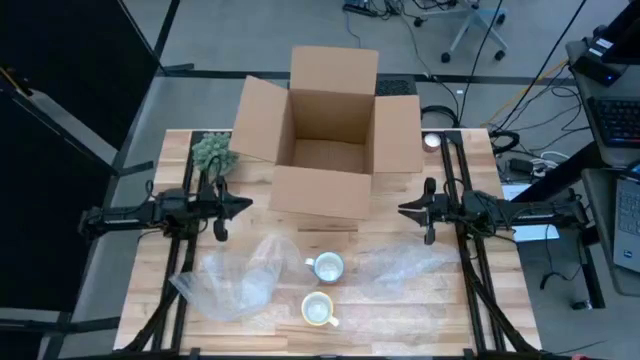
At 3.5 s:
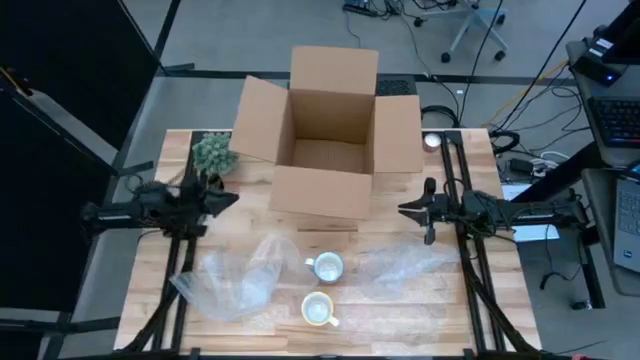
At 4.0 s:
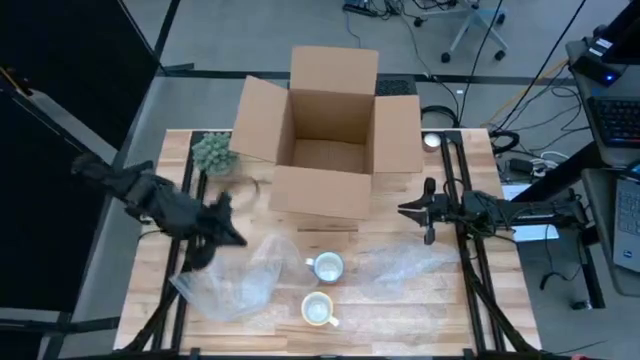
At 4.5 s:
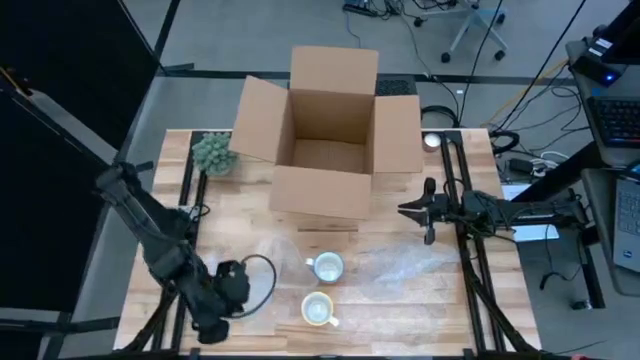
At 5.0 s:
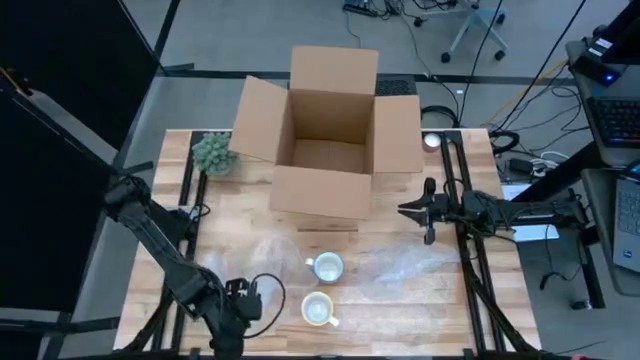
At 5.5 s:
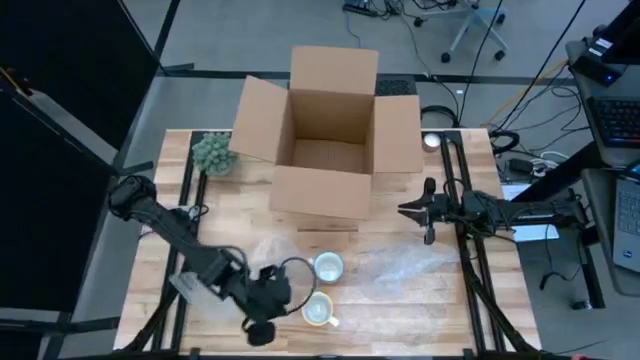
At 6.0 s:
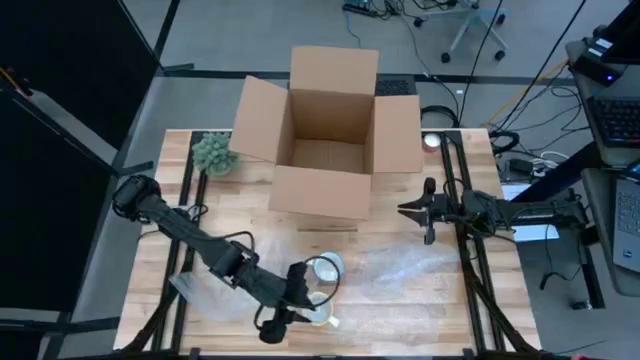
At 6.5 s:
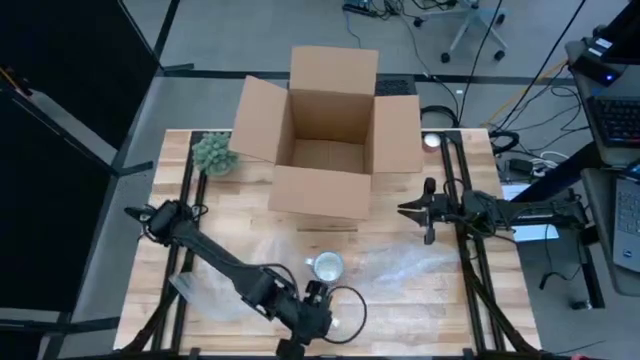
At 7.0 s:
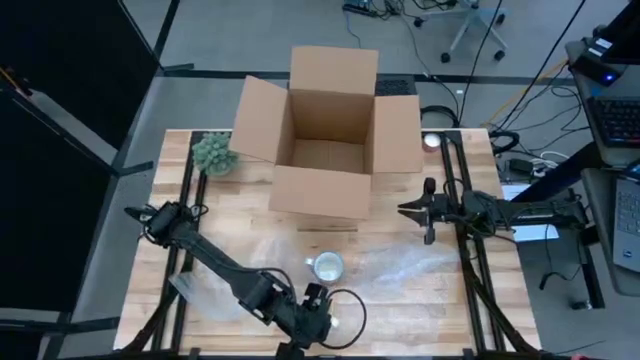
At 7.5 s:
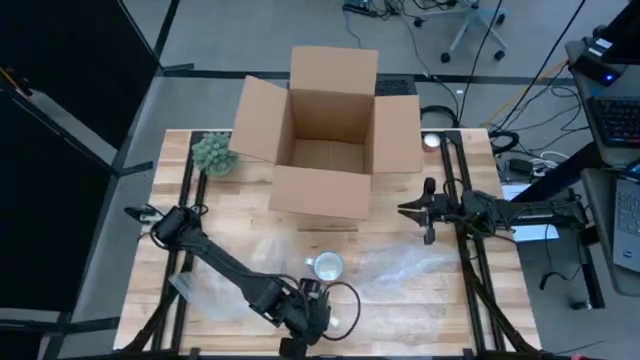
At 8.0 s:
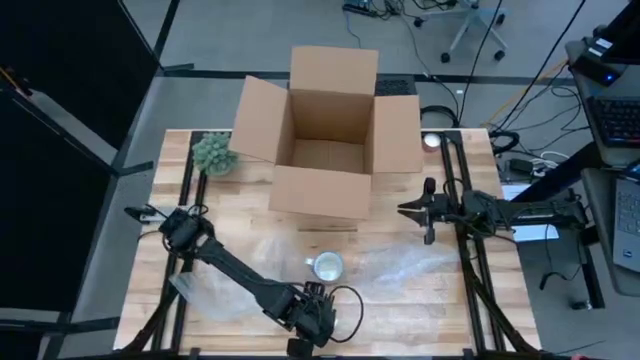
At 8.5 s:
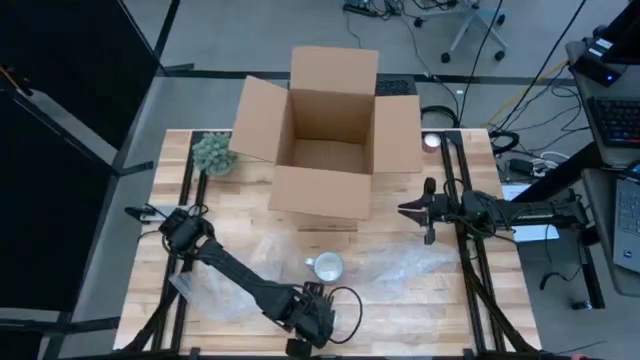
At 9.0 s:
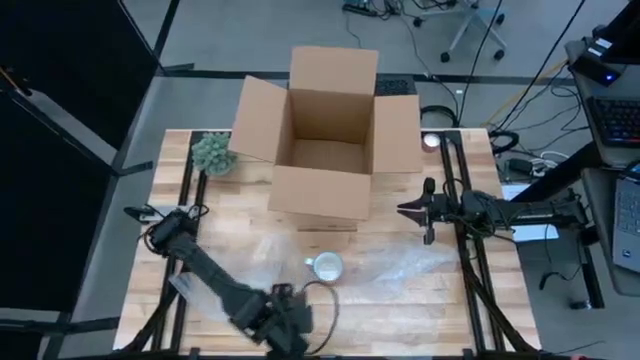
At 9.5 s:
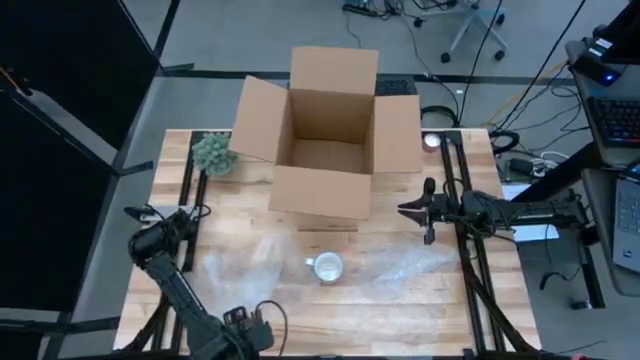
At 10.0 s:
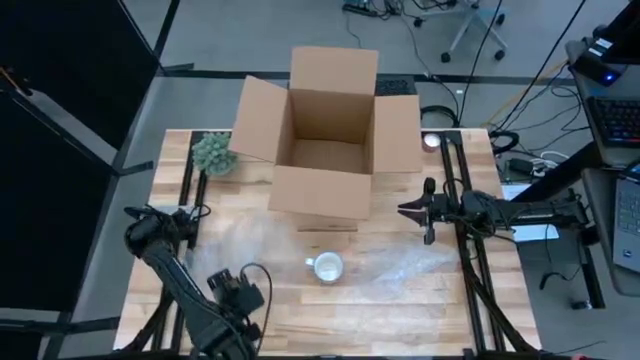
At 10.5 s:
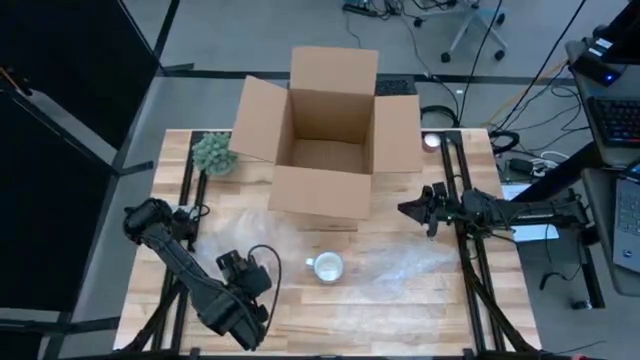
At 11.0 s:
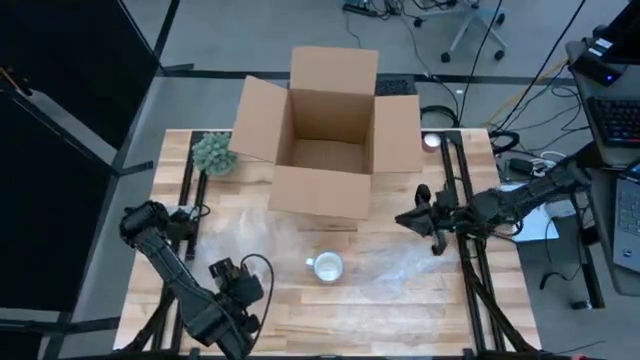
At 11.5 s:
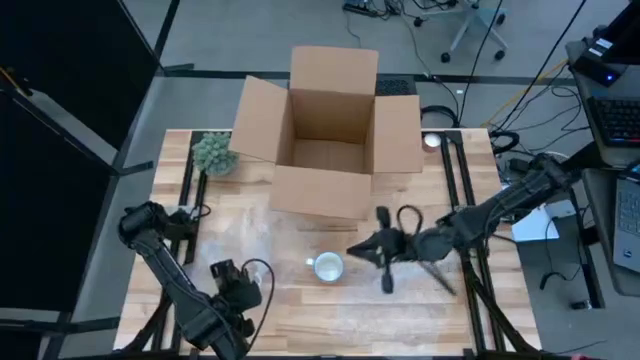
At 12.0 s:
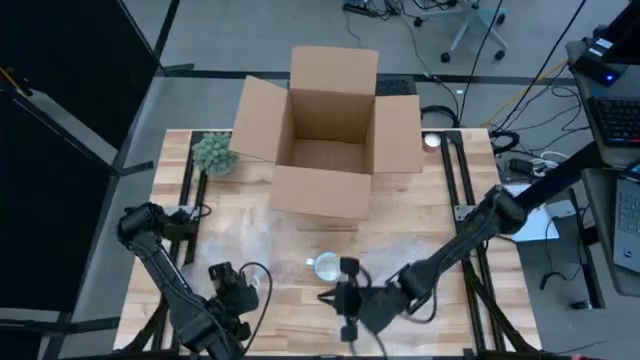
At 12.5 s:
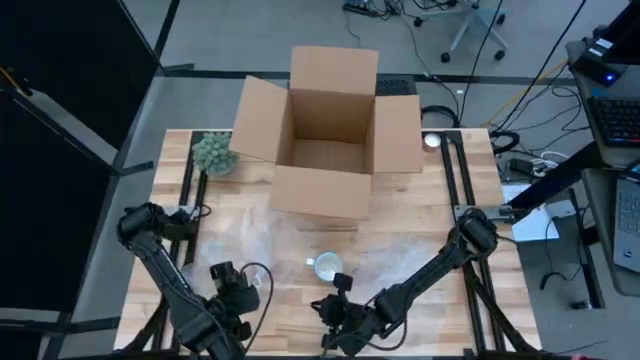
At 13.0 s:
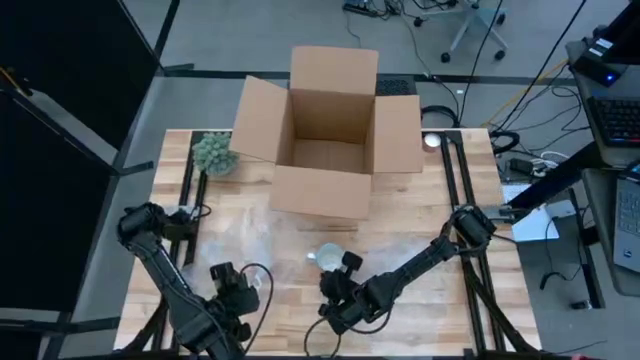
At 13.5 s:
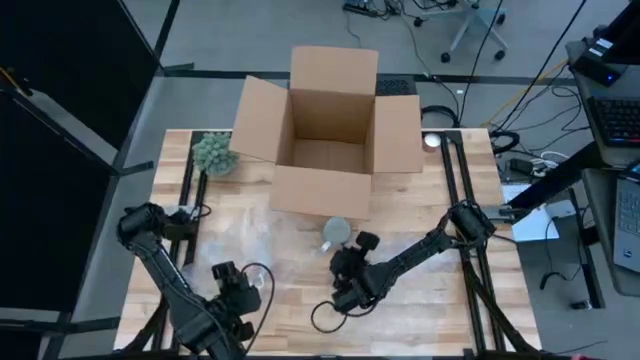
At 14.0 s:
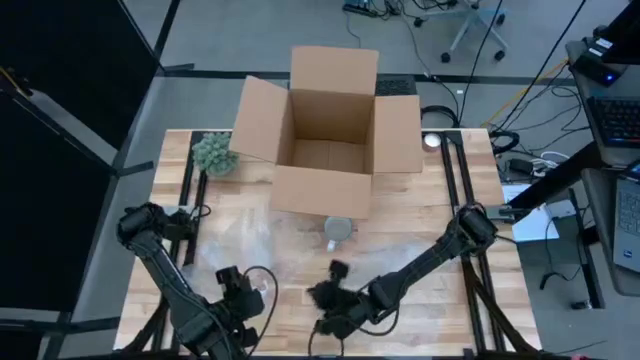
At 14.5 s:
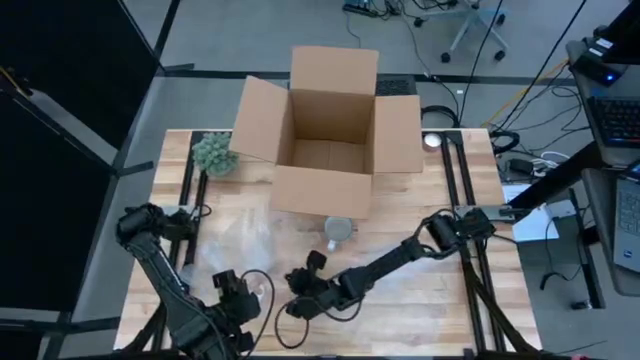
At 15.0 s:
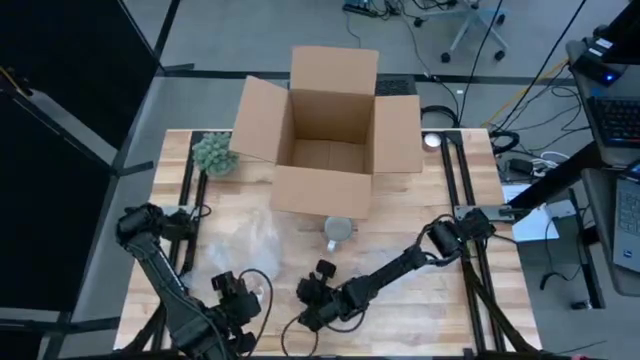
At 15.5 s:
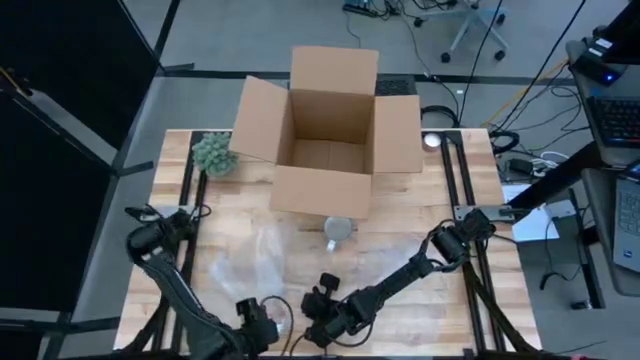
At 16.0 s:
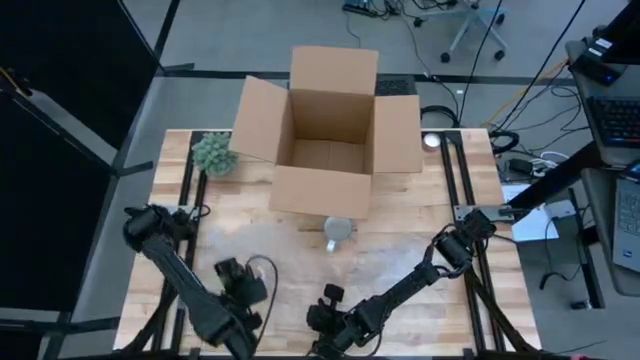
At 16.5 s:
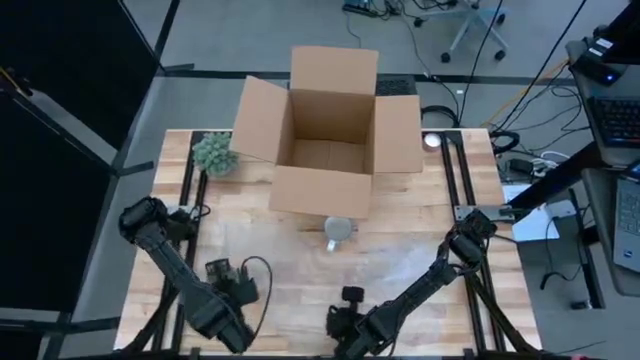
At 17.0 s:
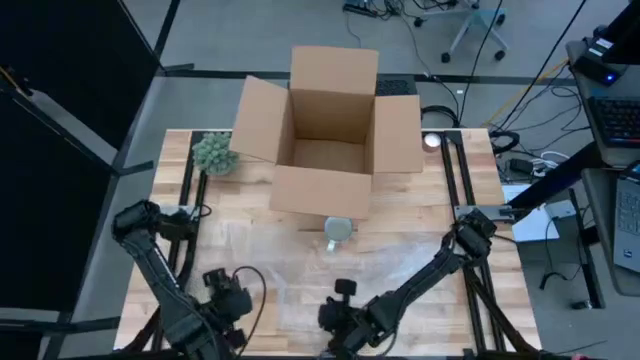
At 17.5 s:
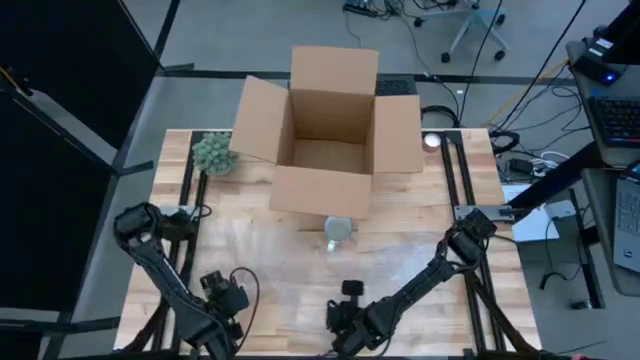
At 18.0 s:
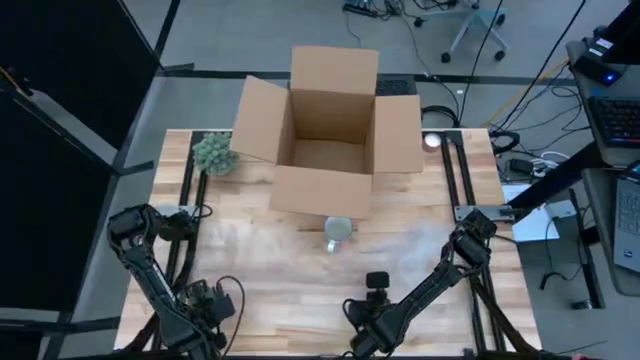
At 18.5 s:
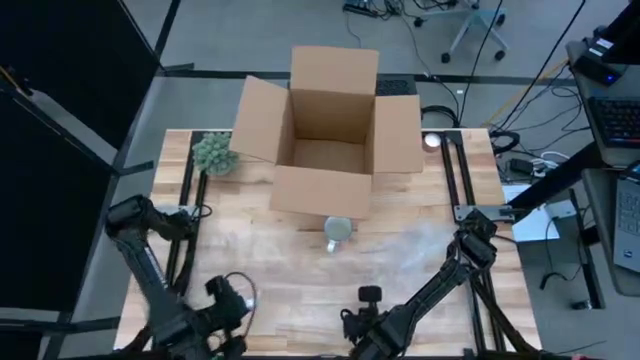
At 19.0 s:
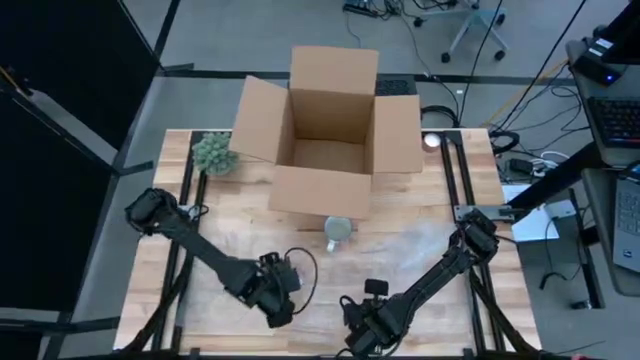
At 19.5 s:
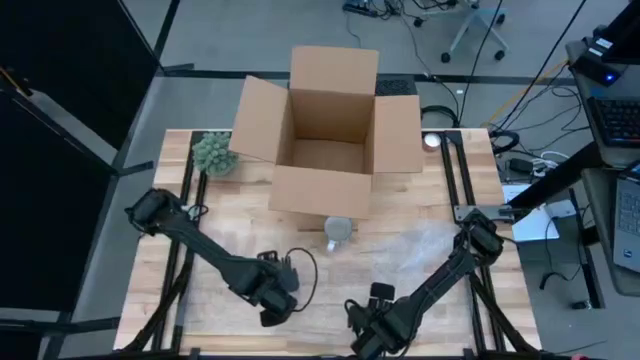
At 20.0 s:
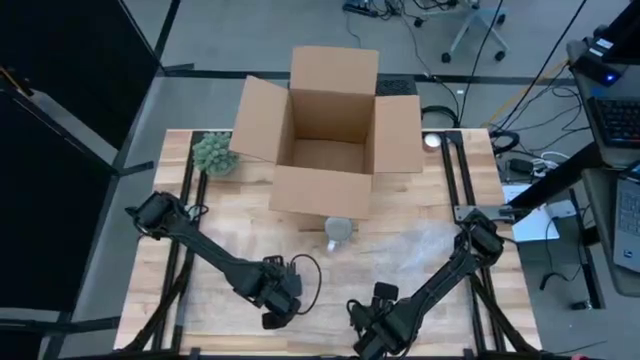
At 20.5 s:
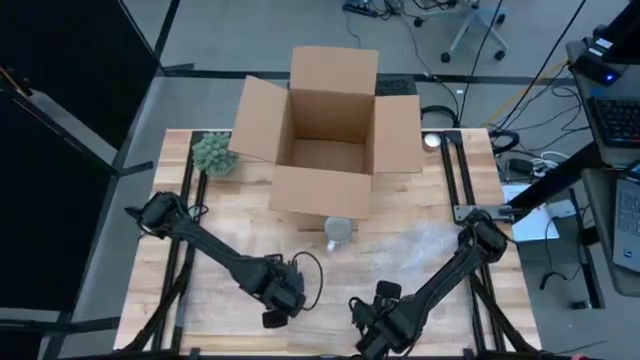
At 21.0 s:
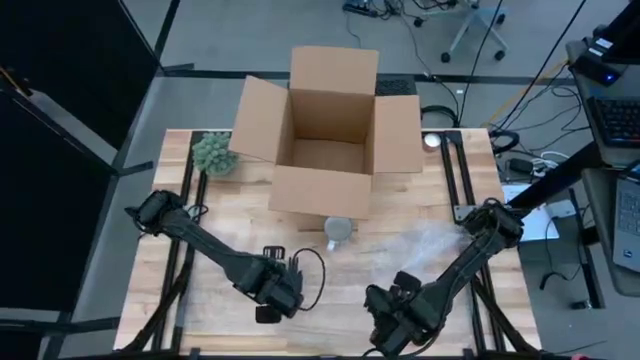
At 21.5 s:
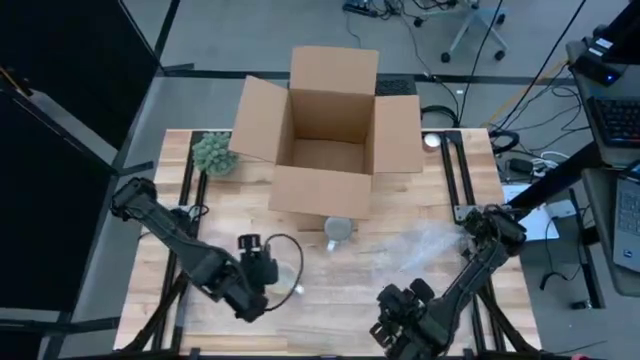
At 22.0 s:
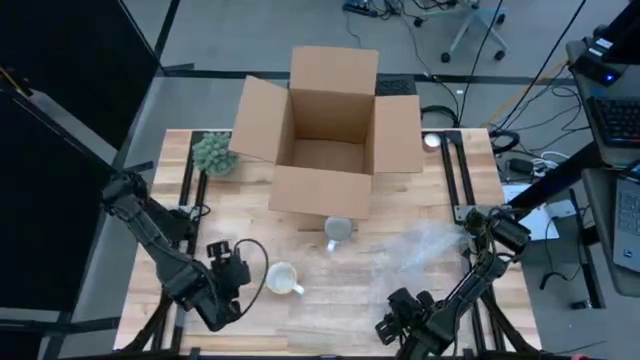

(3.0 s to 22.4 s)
Task: wrap mug
Wrap the orange mug with bubble wrap
